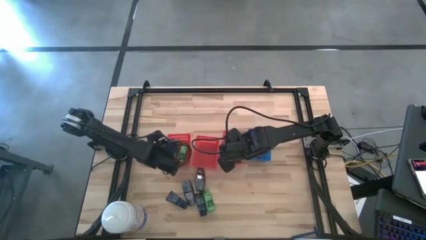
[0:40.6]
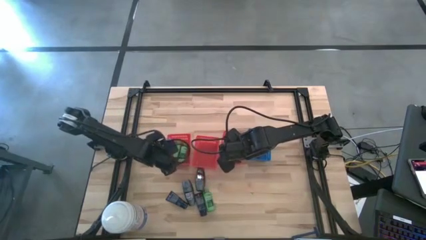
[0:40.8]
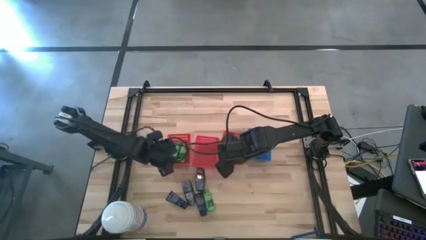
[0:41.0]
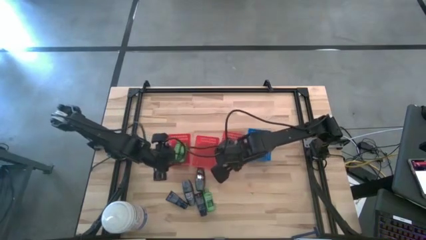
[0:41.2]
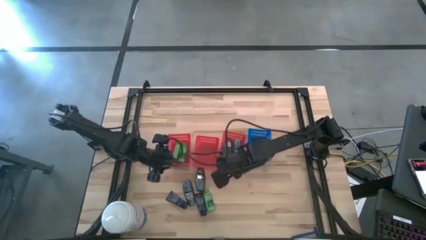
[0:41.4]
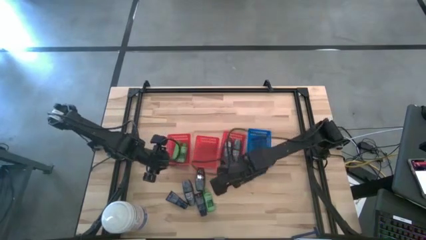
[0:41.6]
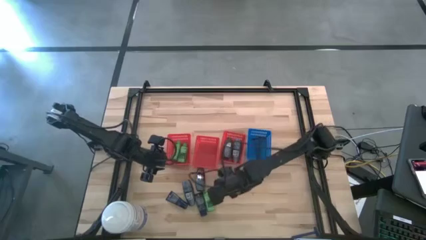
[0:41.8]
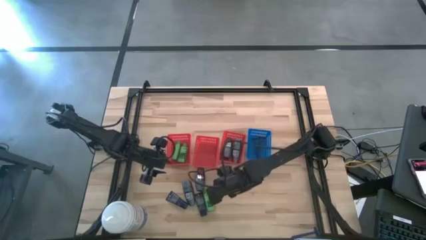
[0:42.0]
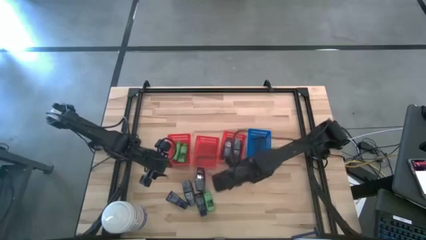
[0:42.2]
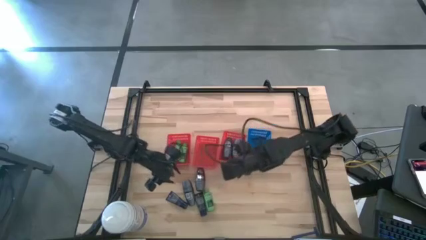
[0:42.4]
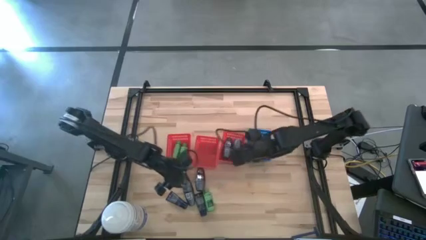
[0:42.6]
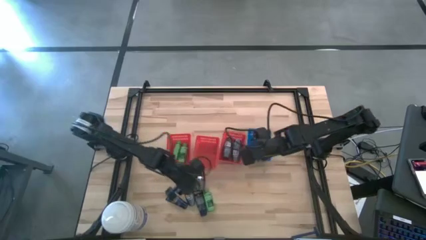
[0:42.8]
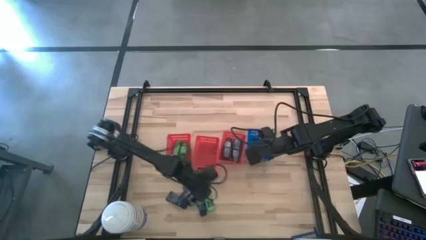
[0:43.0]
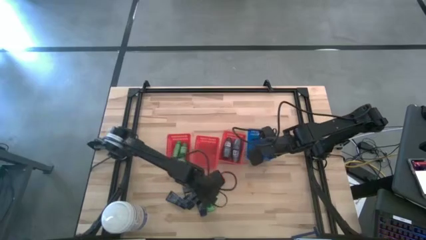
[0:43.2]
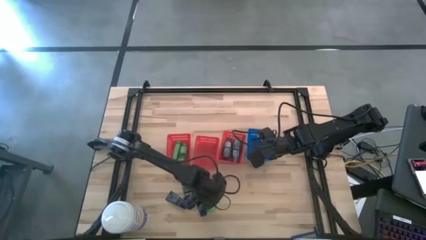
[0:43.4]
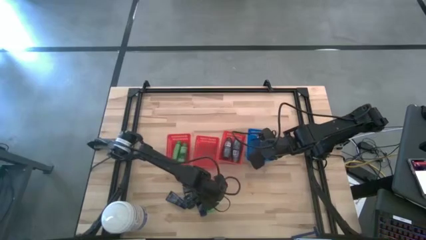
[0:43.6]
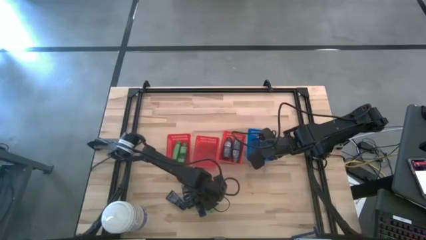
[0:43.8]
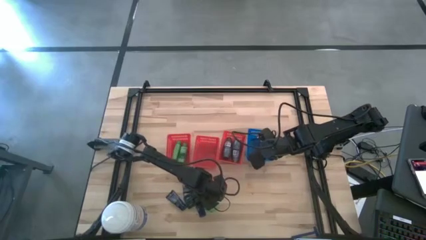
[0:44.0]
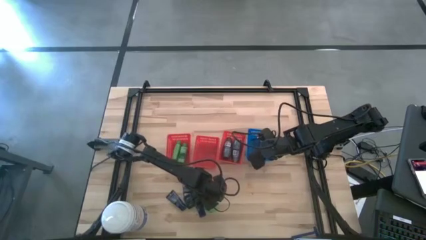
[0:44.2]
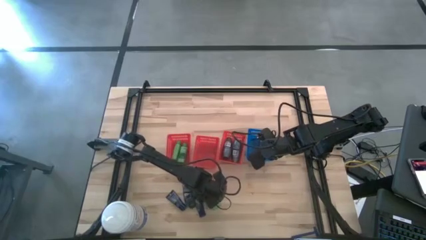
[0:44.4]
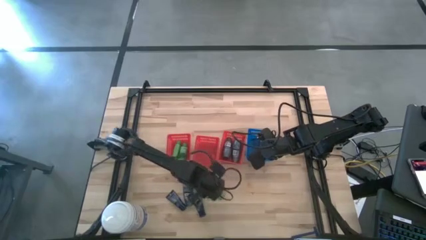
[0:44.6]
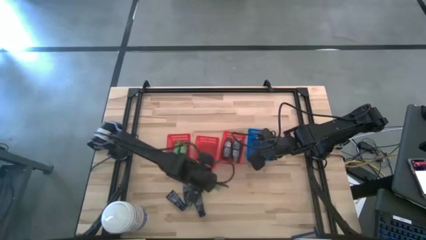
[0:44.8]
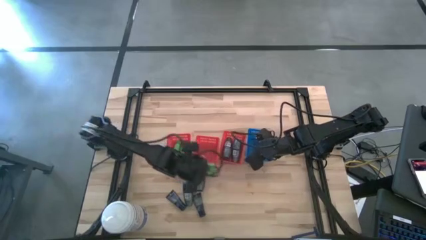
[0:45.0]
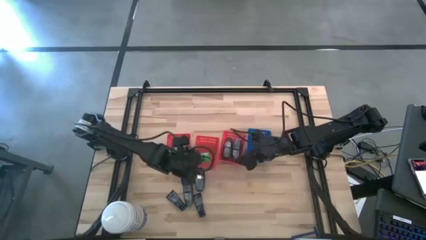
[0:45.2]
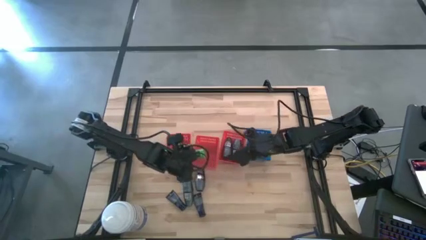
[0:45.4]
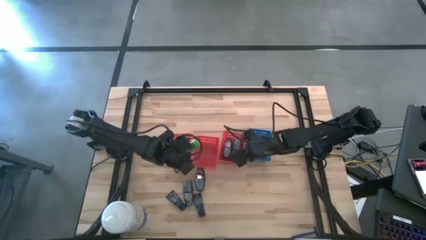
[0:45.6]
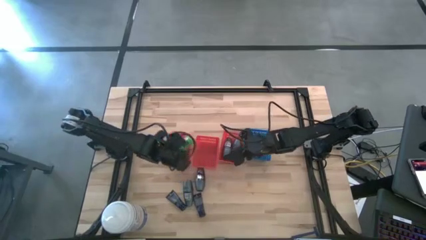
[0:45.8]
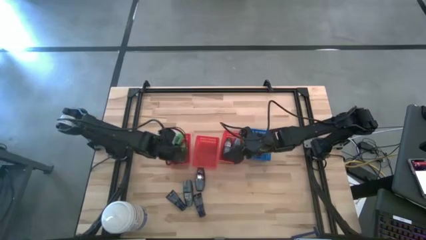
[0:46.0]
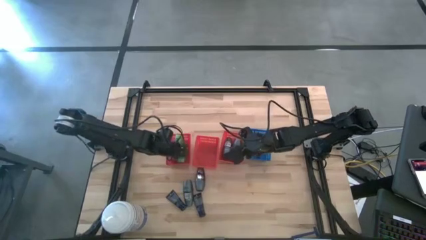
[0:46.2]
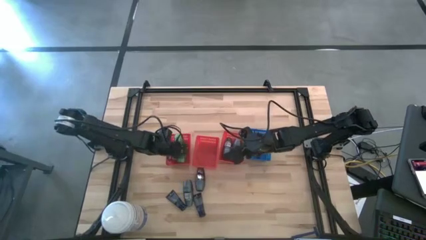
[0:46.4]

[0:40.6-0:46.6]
Task: Pick & Place Travel size toiletries
Put the shampoo into the left red bin

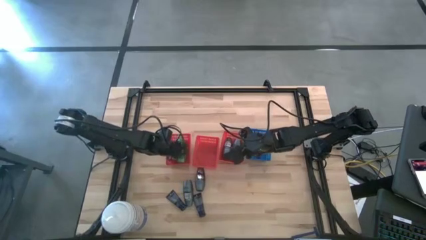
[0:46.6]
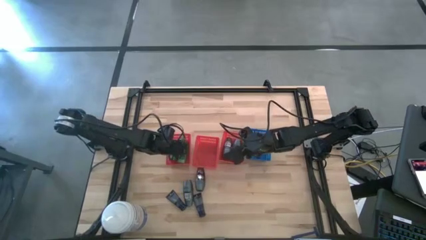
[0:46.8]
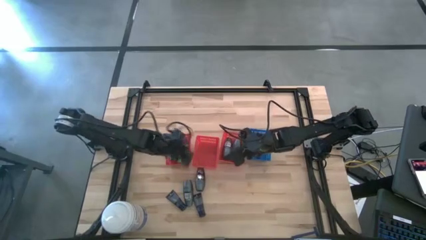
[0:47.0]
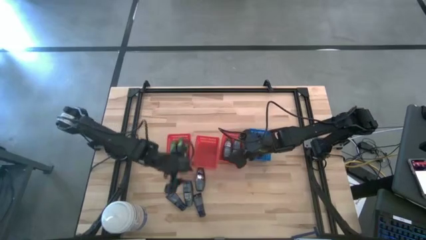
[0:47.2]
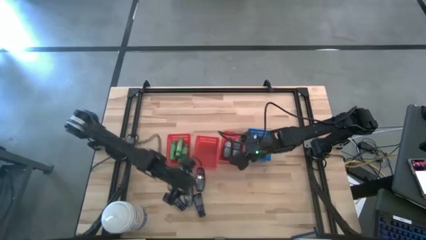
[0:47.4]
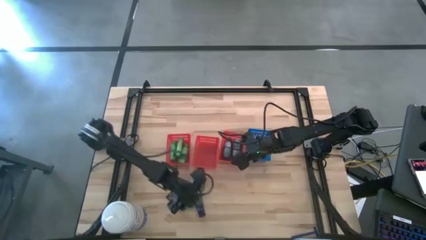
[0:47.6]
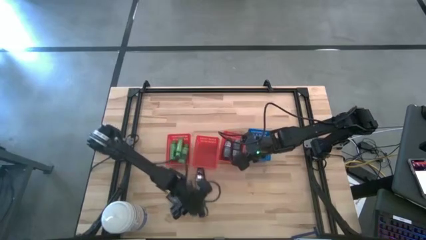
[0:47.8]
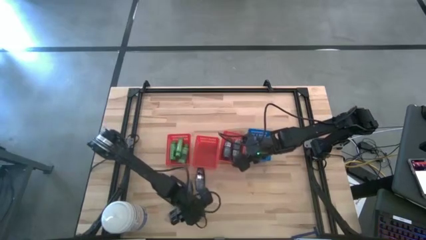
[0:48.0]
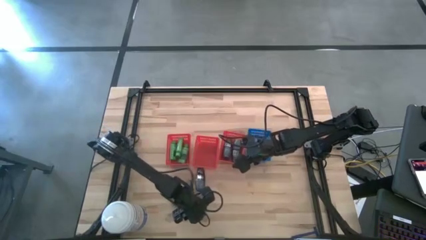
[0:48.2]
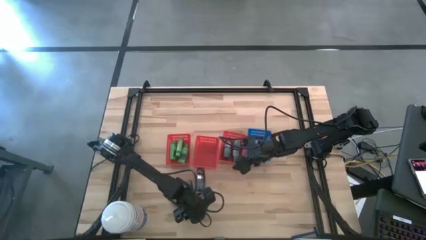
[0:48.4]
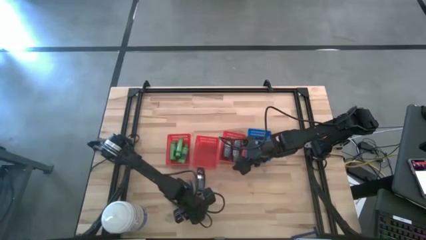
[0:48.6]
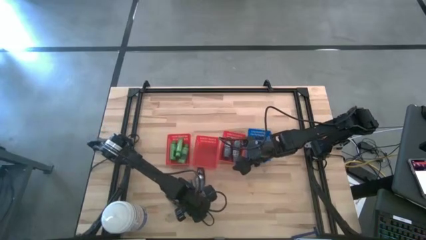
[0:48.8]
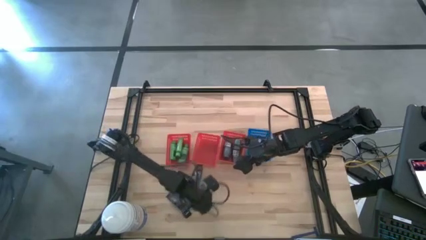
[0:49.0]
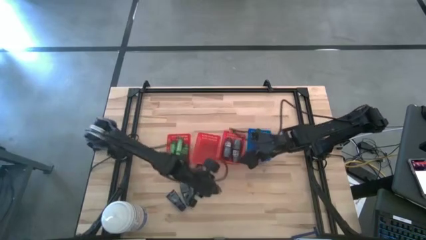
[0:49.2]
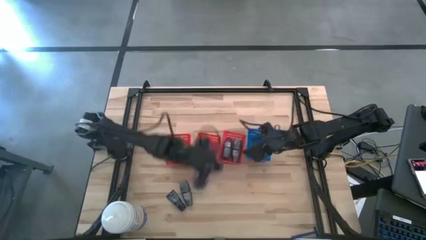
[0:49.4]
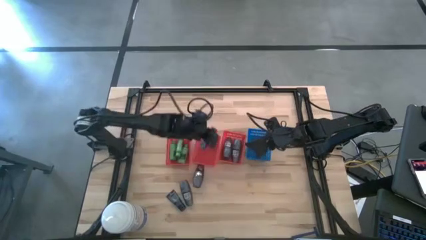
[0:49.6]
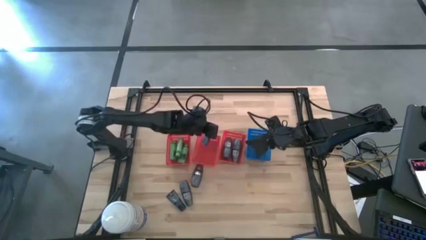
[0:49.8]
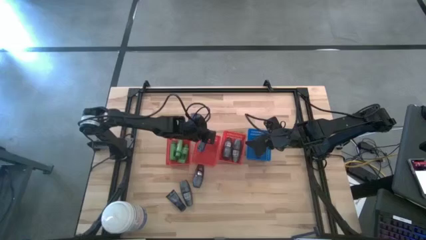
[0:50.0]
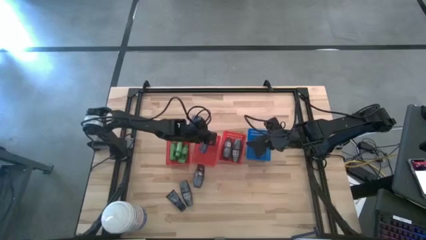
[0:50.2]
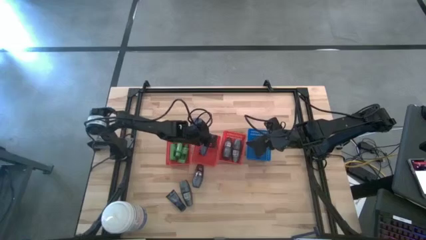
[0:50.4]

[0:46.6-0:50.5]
Put the shave cream into the middle red bin

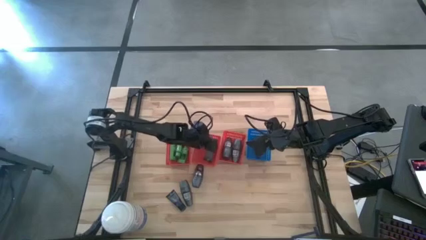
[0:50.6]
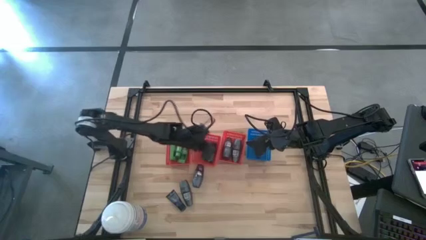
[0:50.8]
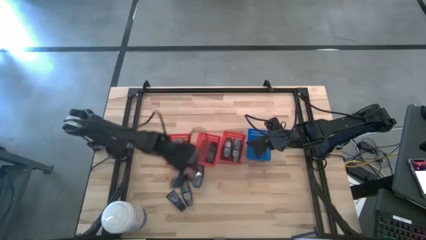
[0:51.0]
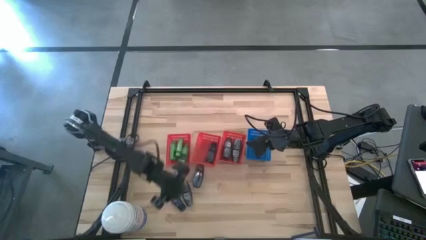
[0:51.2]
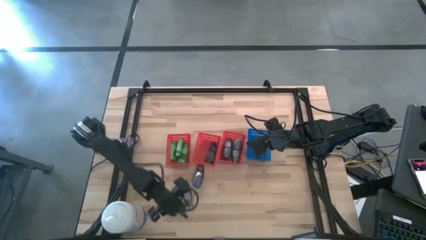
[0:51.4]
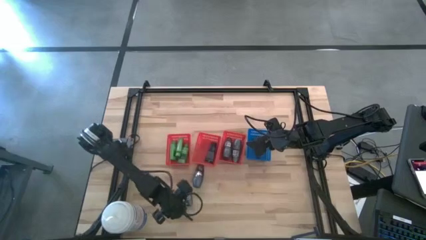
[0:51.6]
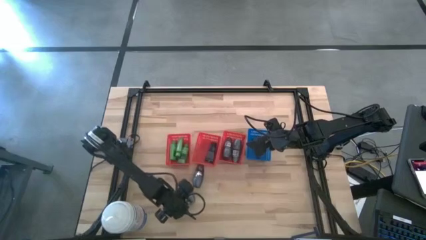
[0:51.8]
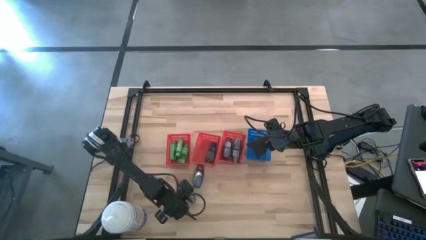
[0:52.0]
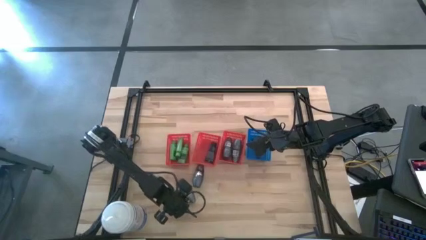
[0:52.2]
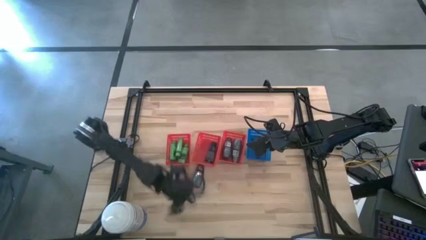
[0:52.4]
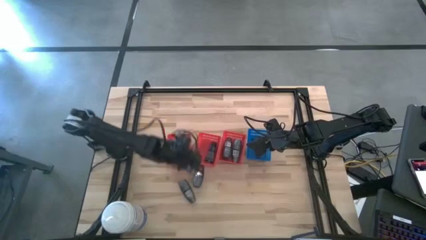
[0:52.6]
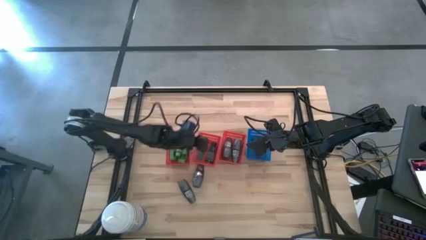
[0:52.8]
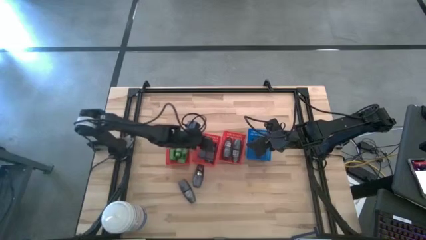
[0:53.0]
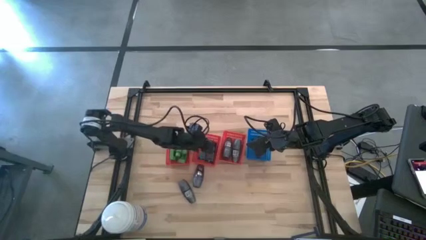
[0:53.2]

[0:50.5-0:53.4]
Put the shave cream into the middle red bin
